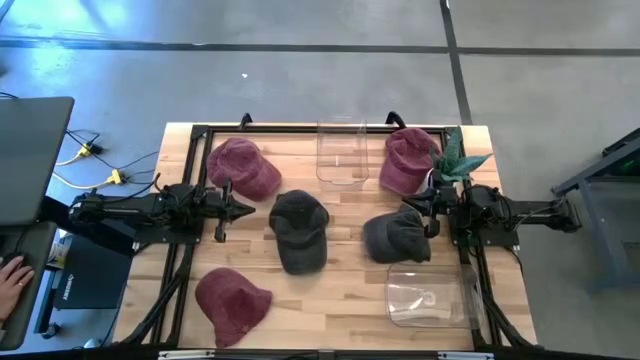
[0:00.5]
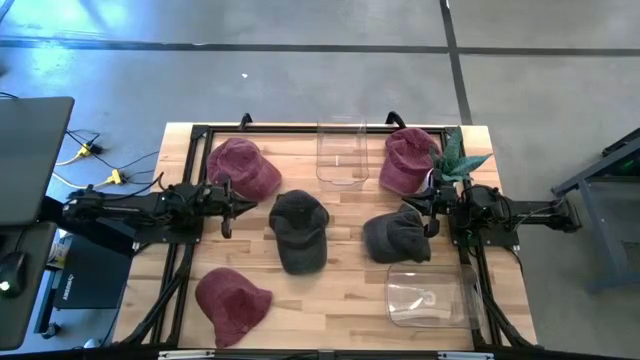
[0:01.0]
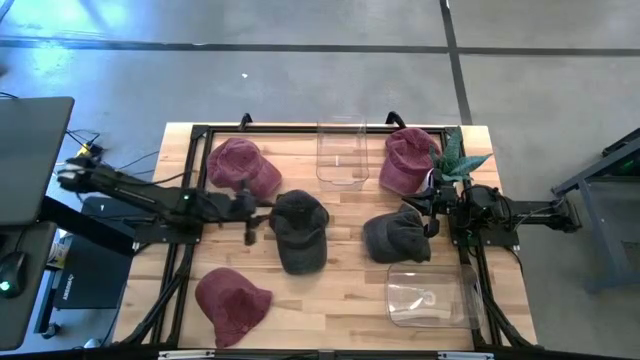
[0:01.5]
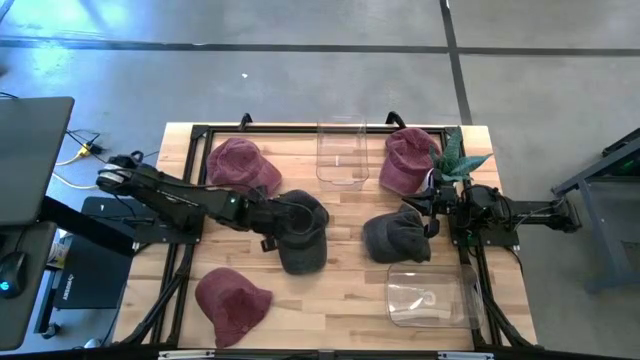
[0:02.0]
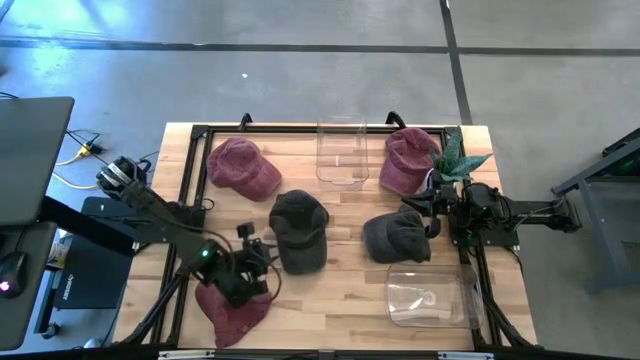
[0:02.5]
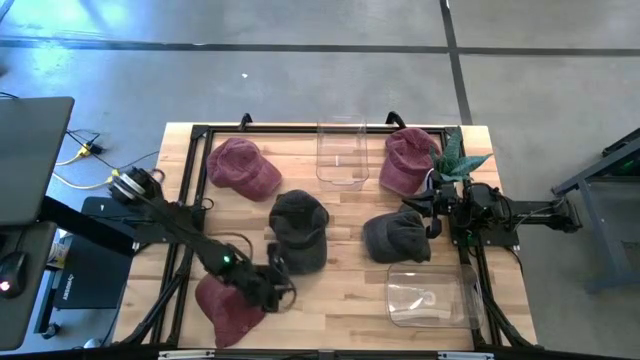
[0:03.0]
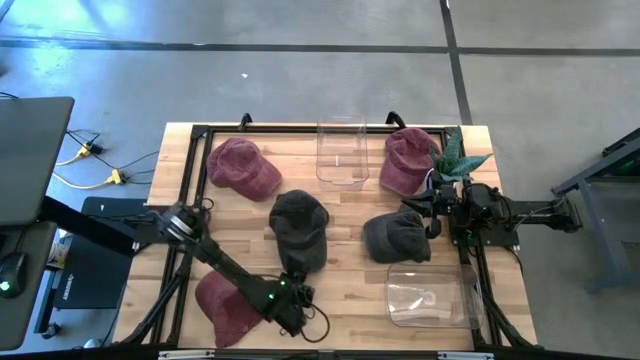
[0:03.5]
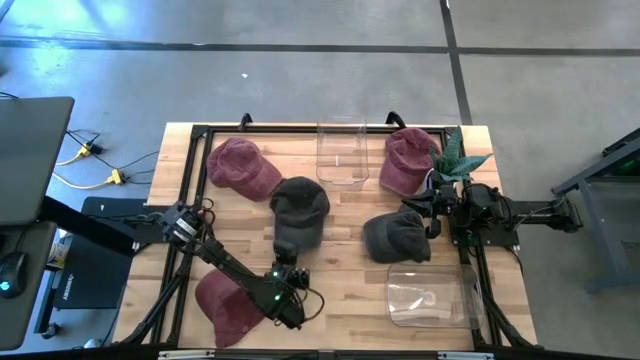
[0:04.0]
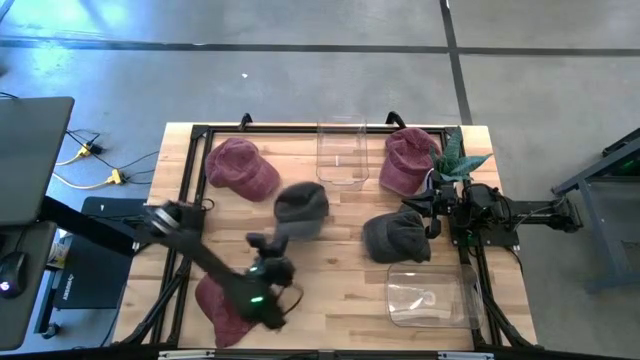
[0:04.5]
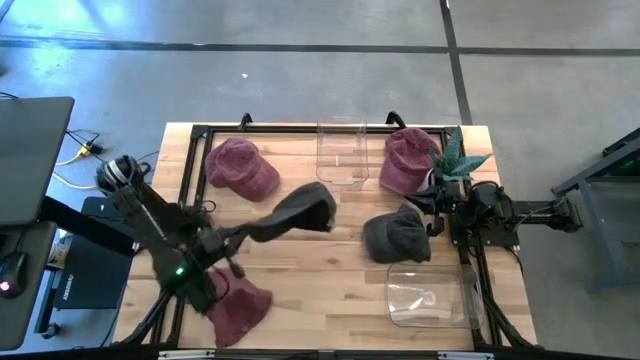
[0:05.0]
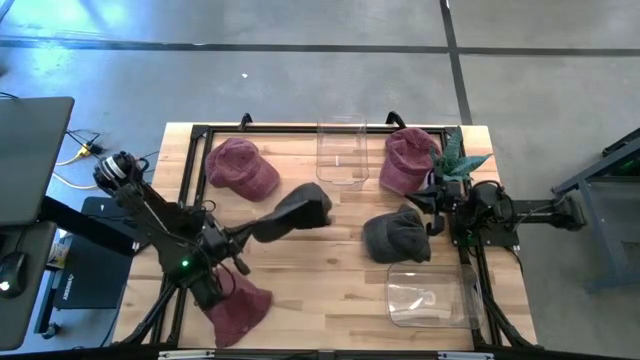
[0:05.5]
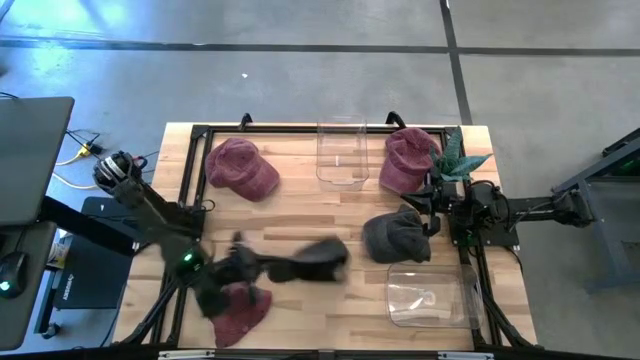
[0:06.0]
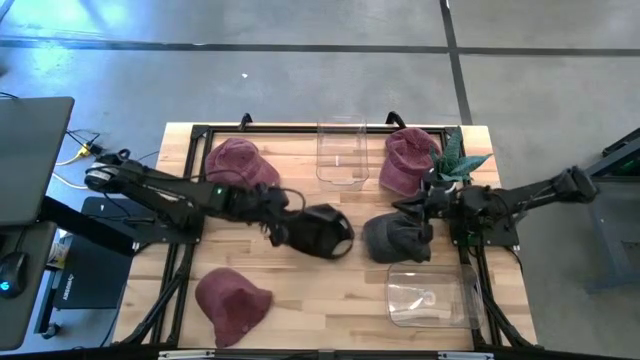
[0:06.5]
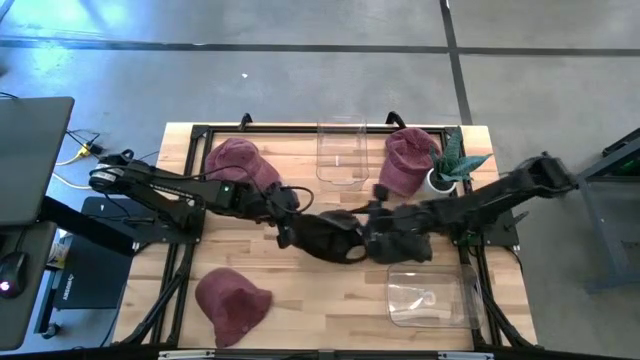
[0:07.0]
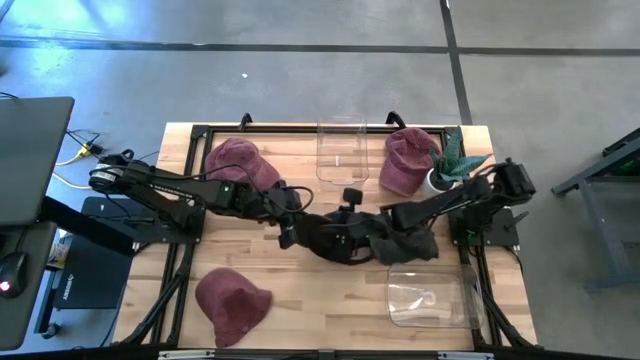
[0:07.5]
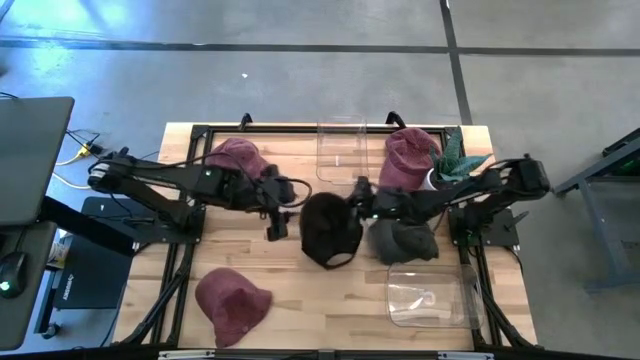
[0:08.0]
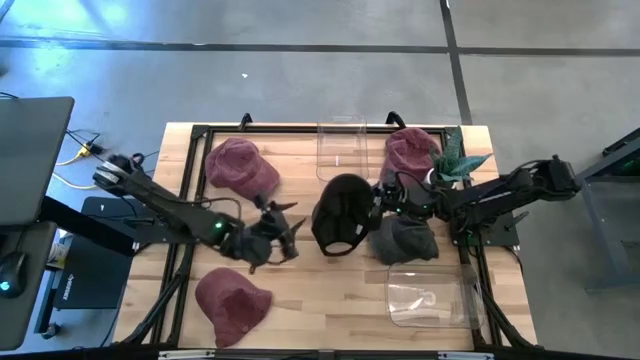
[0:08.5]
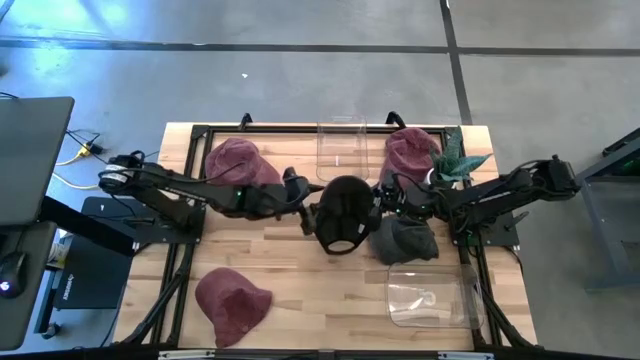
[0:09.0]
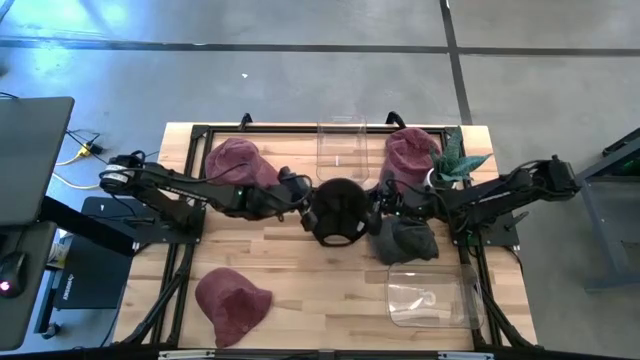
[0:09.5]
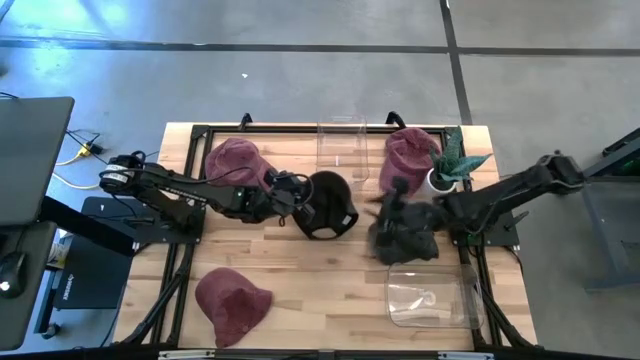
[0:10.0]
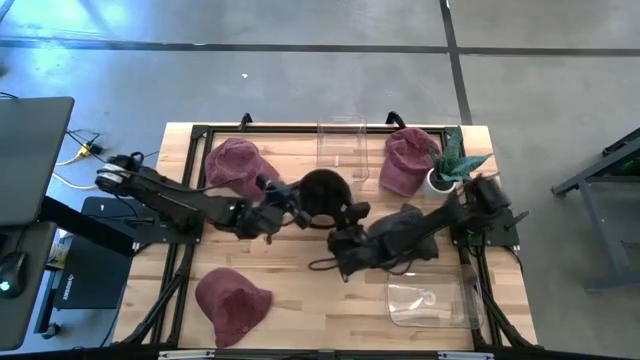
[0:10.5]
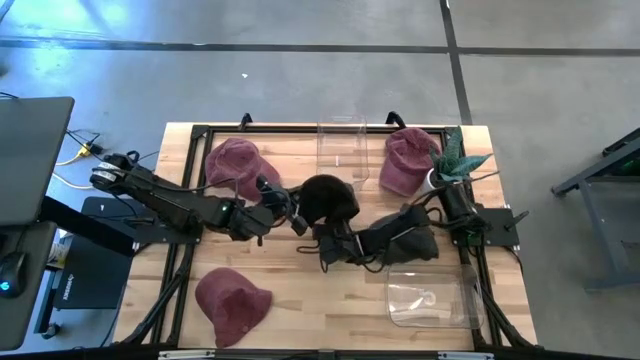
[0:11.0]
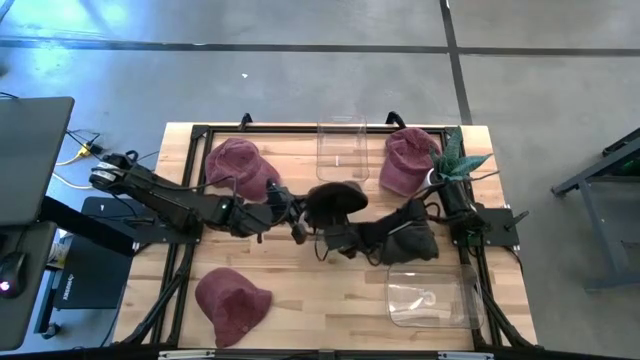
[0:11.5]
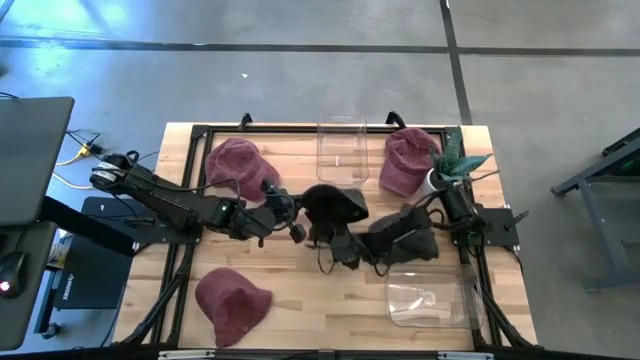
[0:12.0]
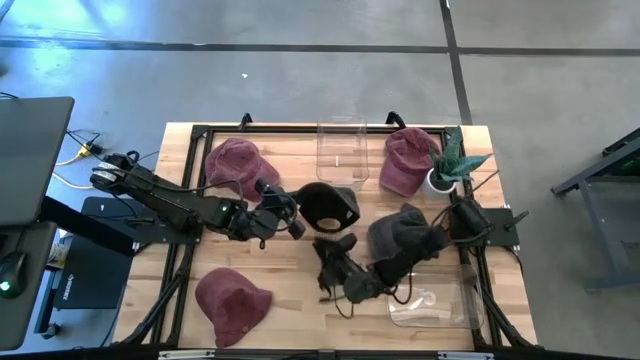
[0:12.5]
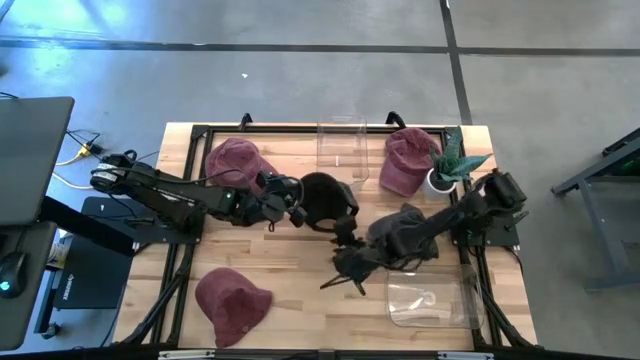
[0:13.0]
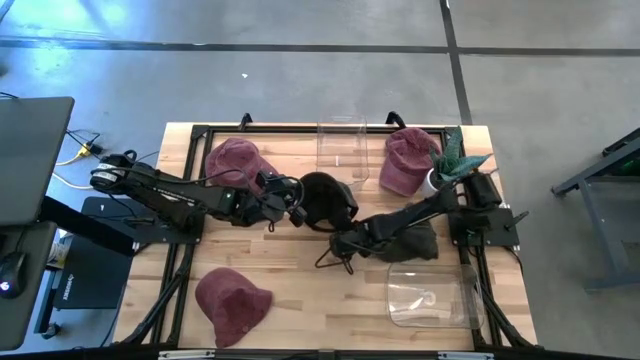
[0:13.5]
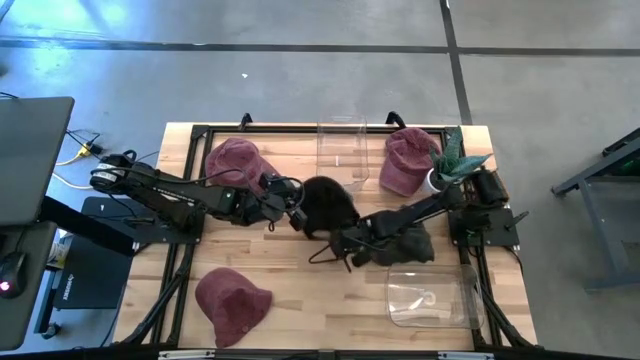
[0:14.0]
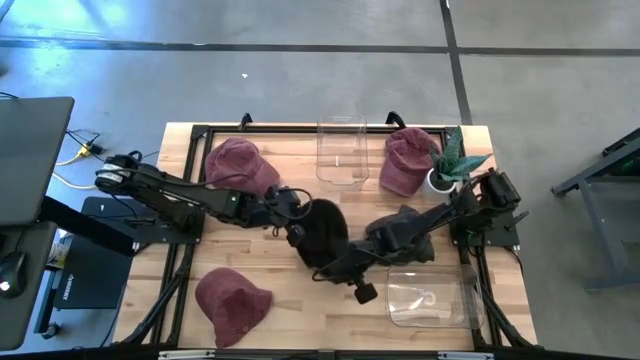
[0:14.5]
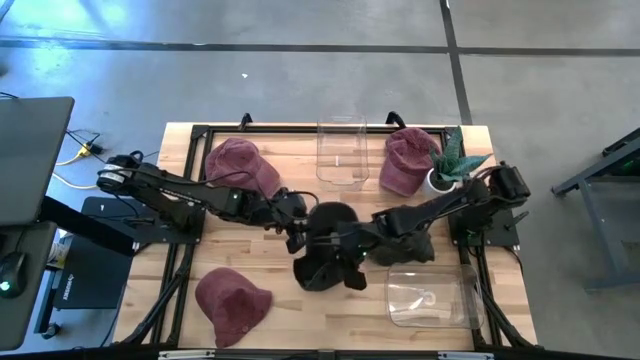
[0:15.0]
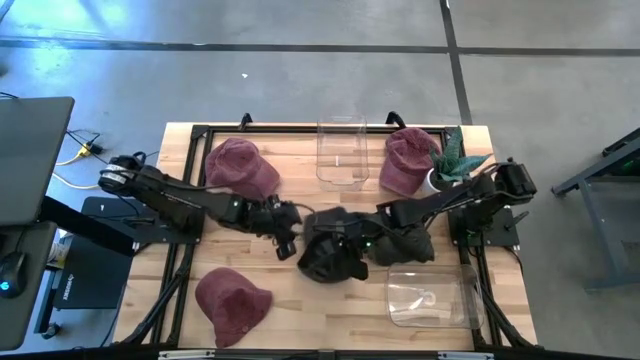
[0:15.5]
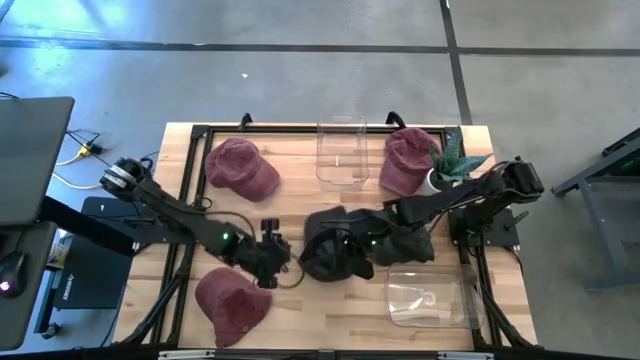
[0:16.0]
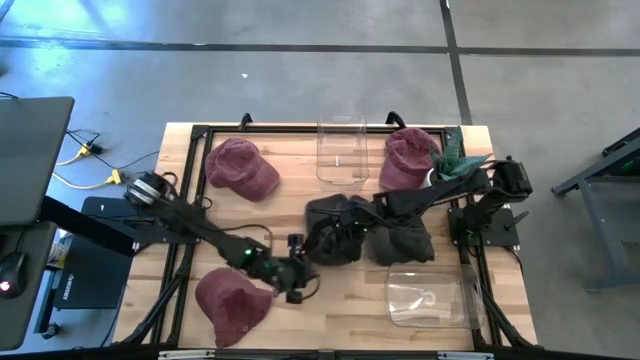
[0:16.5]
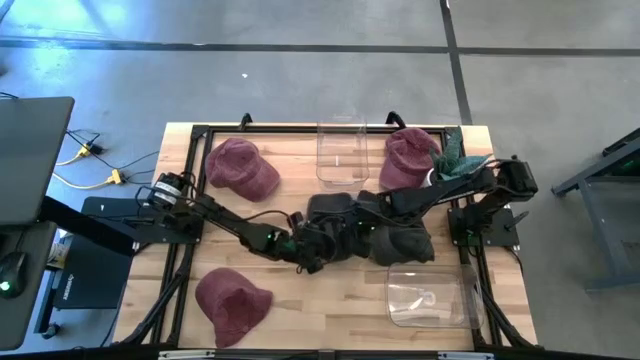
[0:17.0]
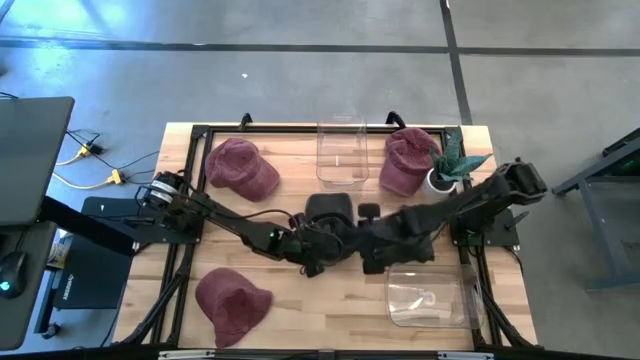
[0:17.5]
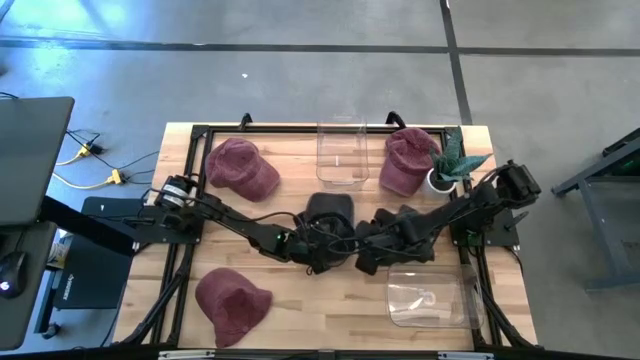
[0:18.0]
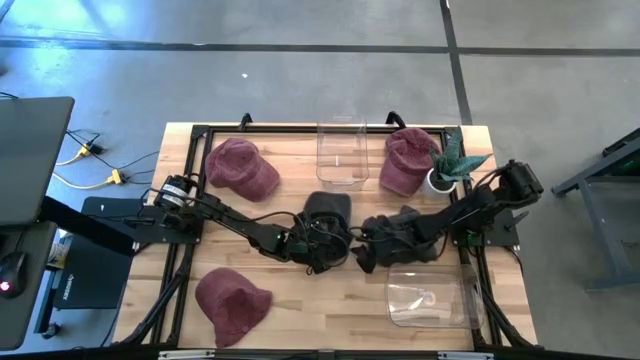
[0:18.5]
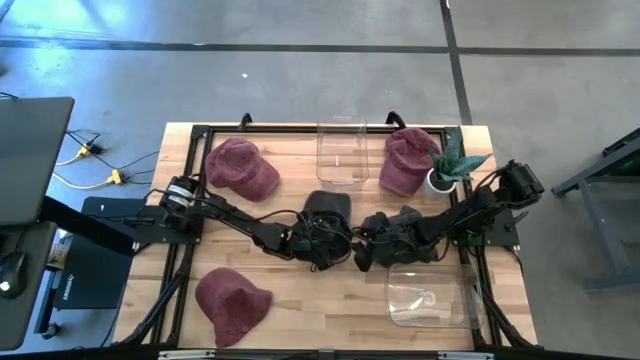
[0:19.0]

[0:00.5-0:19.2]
Task: Pick & Place hat
Put the left black cap into the top transparent bin
